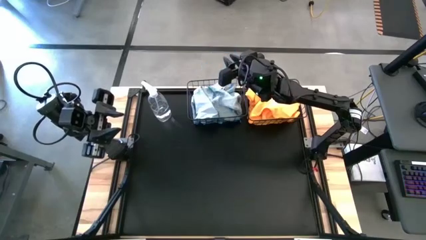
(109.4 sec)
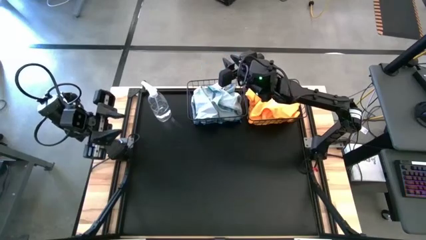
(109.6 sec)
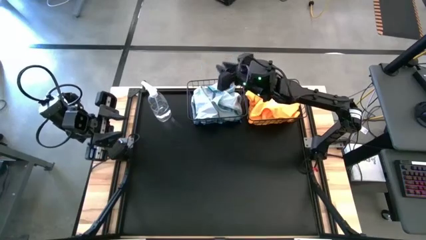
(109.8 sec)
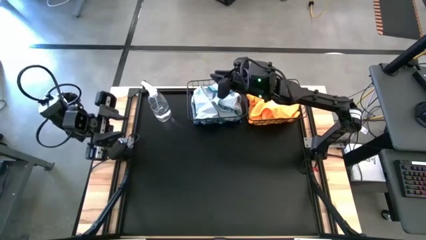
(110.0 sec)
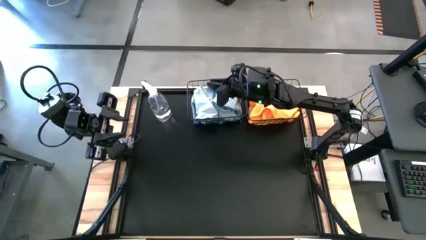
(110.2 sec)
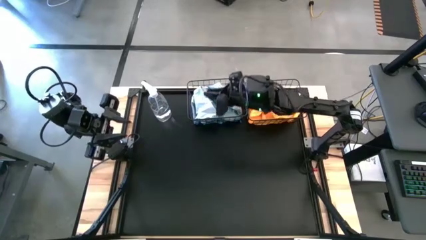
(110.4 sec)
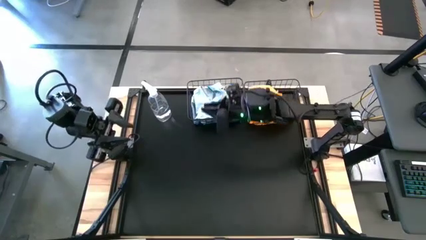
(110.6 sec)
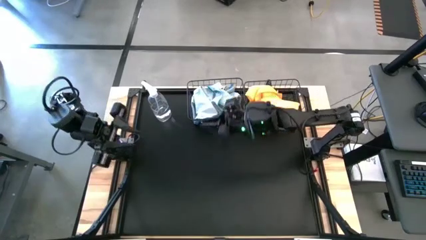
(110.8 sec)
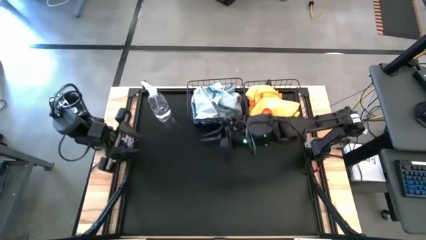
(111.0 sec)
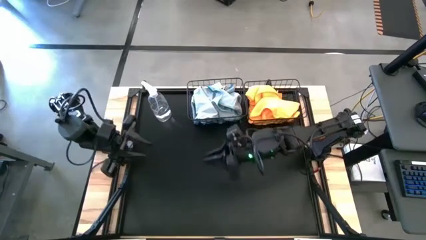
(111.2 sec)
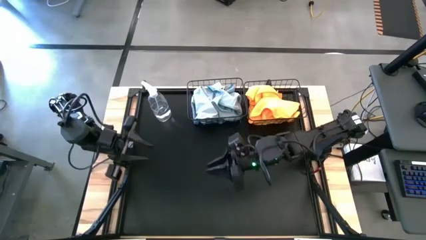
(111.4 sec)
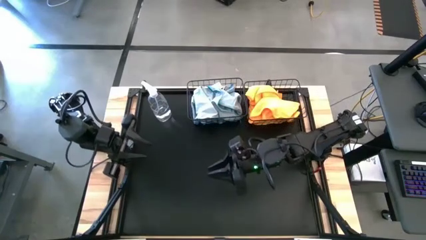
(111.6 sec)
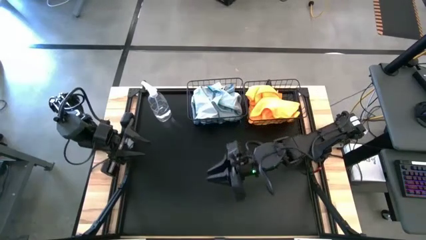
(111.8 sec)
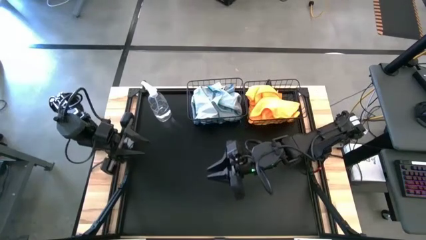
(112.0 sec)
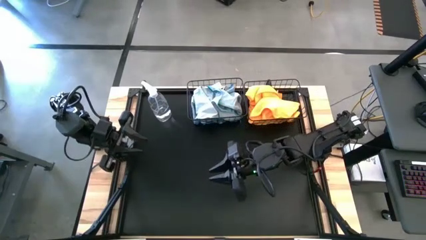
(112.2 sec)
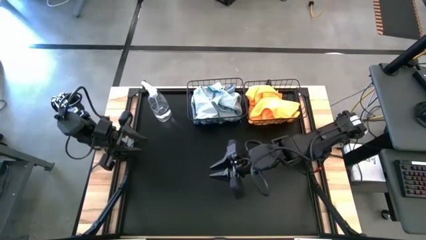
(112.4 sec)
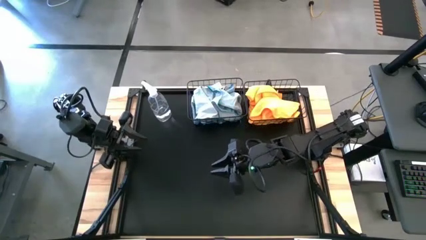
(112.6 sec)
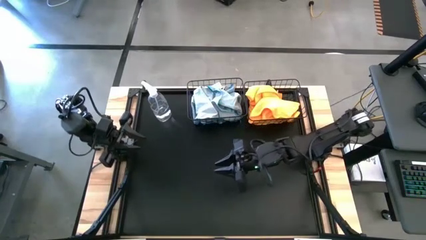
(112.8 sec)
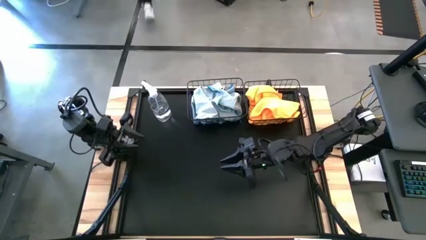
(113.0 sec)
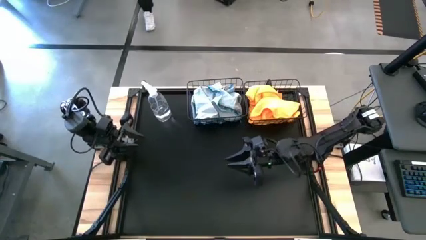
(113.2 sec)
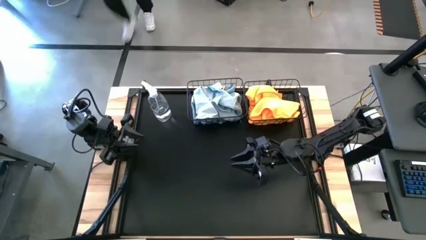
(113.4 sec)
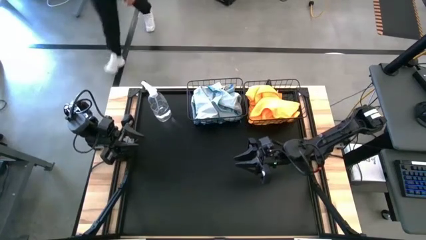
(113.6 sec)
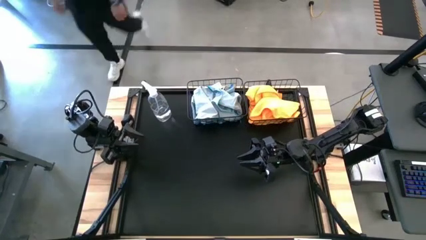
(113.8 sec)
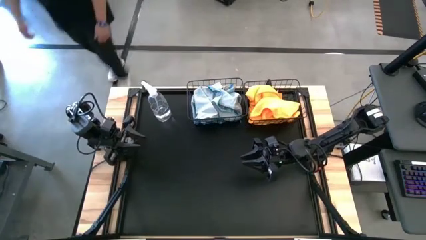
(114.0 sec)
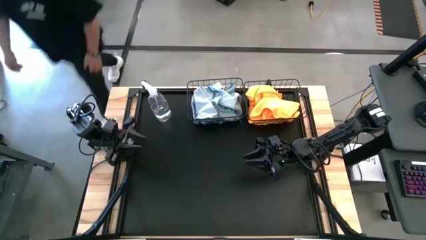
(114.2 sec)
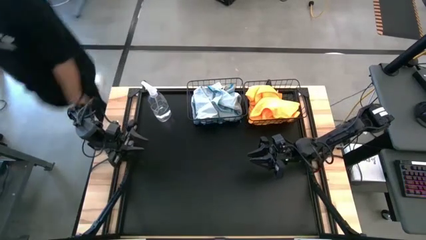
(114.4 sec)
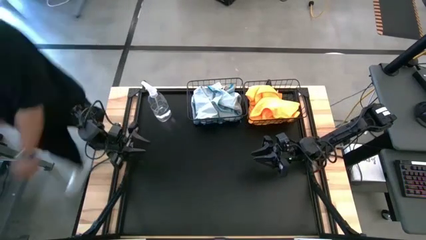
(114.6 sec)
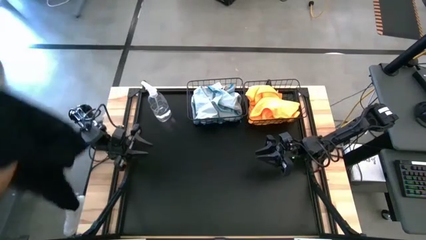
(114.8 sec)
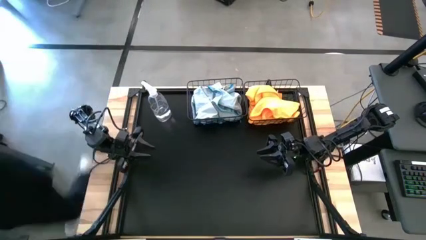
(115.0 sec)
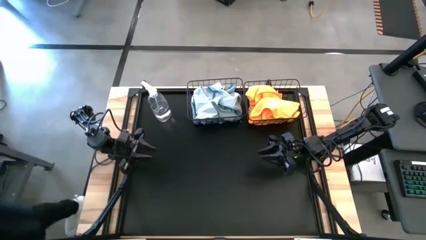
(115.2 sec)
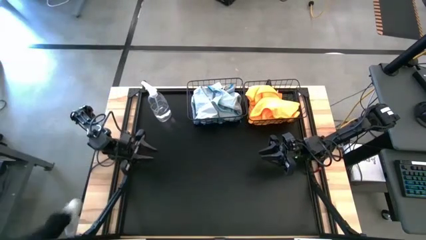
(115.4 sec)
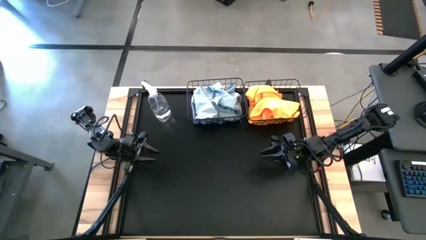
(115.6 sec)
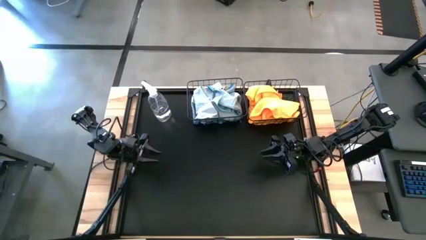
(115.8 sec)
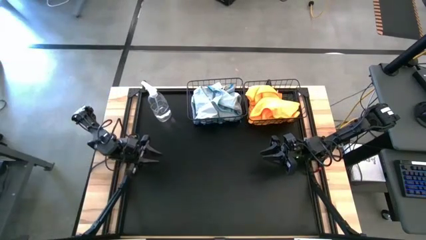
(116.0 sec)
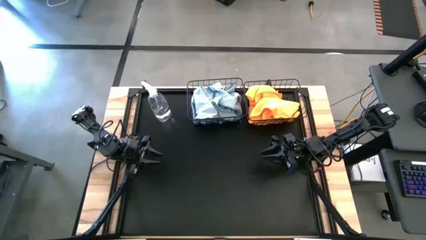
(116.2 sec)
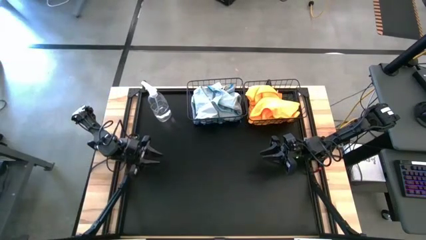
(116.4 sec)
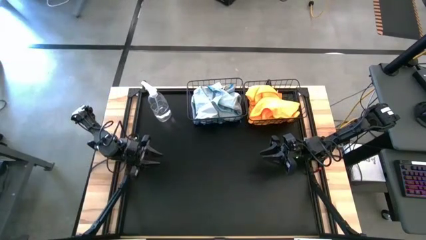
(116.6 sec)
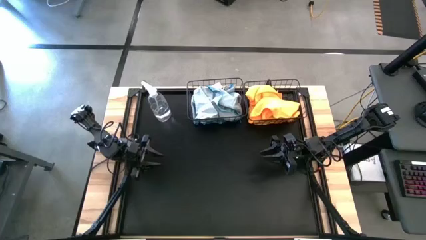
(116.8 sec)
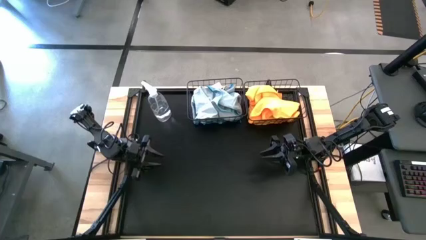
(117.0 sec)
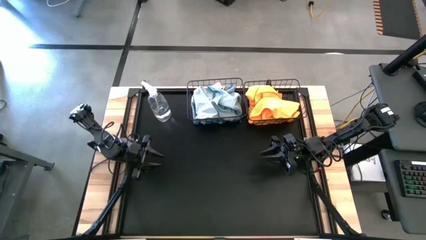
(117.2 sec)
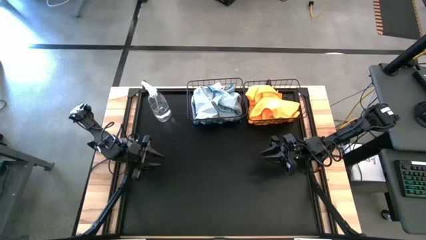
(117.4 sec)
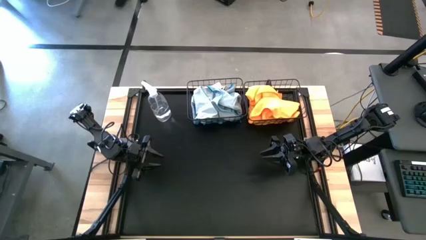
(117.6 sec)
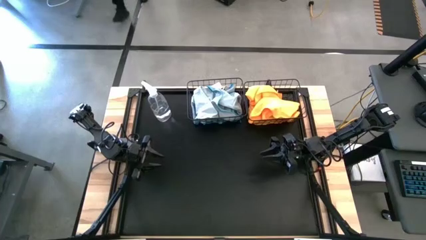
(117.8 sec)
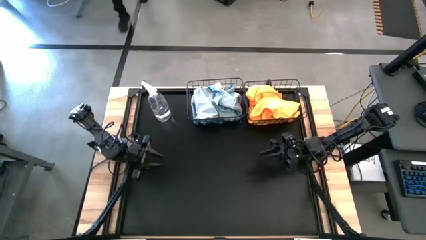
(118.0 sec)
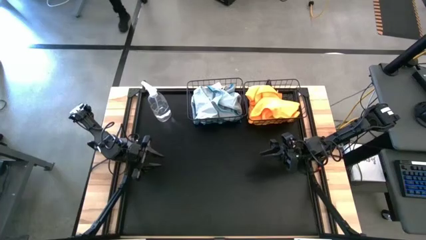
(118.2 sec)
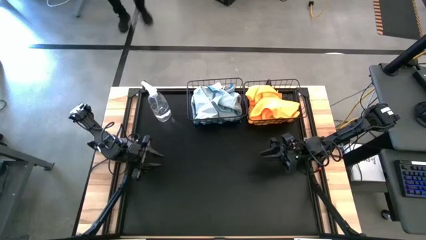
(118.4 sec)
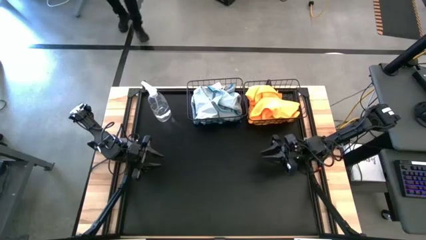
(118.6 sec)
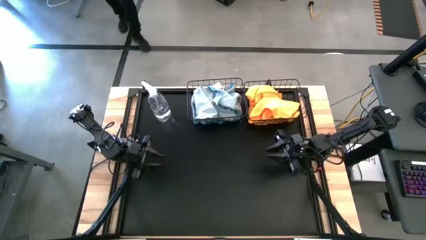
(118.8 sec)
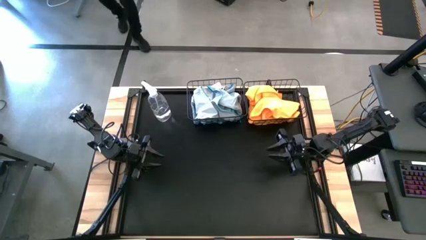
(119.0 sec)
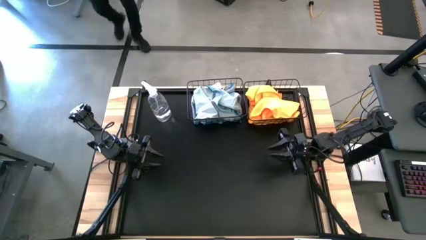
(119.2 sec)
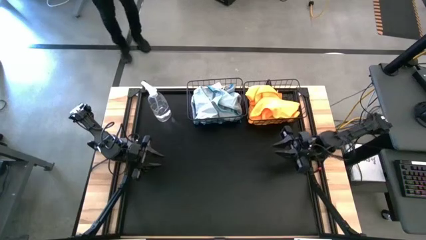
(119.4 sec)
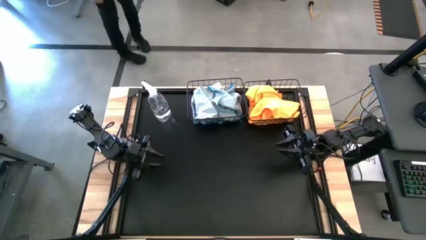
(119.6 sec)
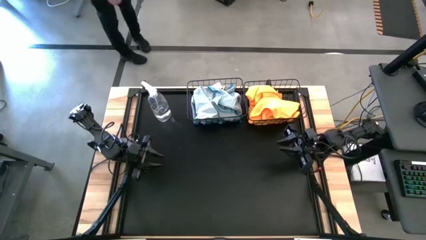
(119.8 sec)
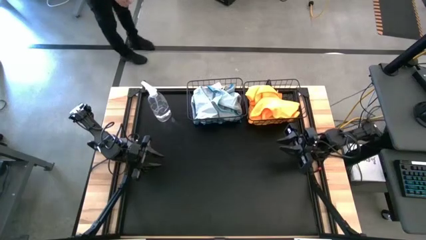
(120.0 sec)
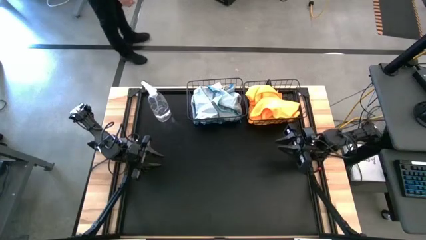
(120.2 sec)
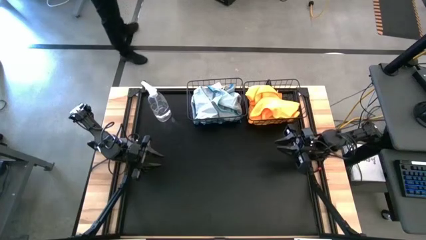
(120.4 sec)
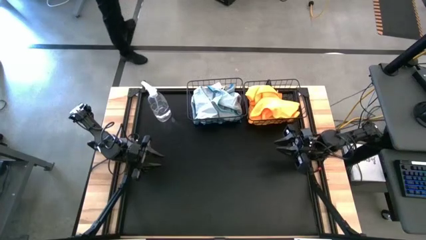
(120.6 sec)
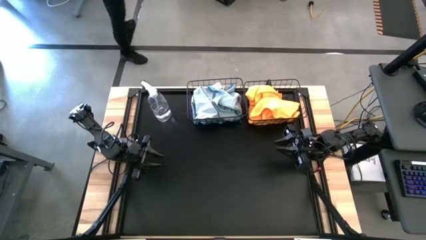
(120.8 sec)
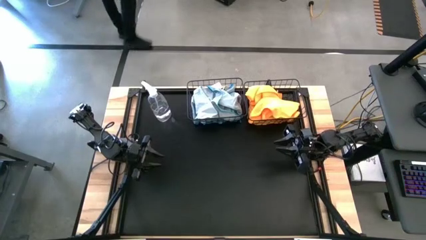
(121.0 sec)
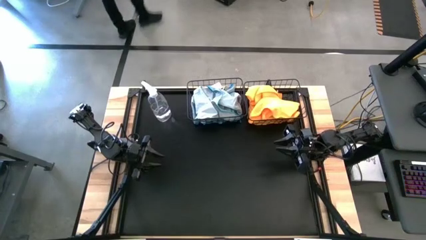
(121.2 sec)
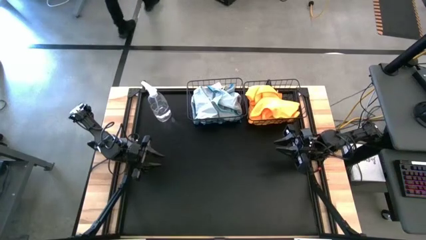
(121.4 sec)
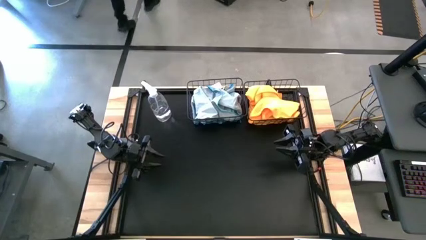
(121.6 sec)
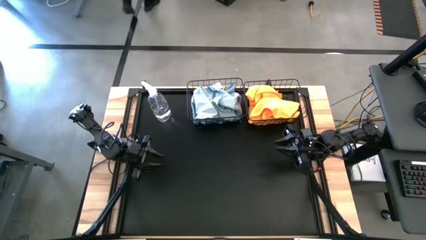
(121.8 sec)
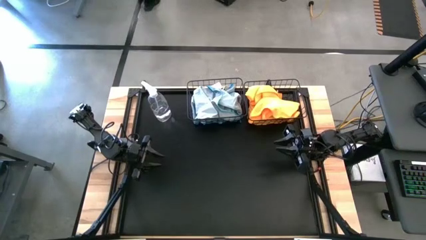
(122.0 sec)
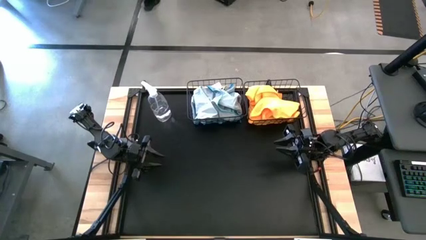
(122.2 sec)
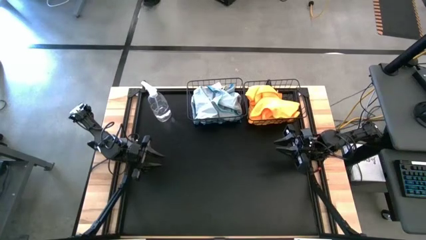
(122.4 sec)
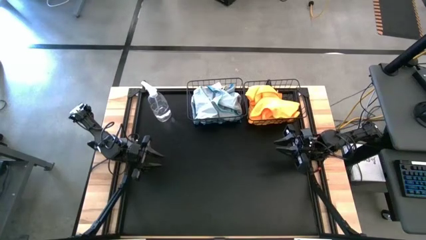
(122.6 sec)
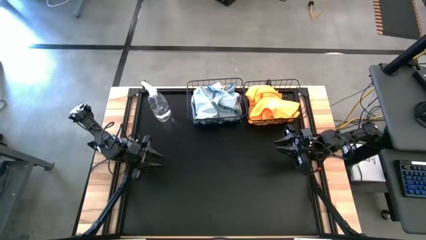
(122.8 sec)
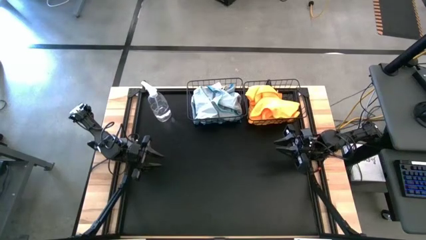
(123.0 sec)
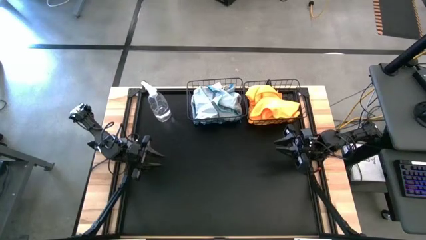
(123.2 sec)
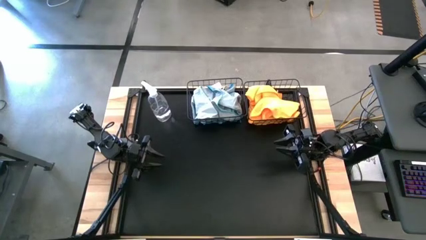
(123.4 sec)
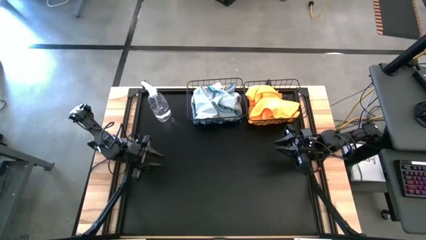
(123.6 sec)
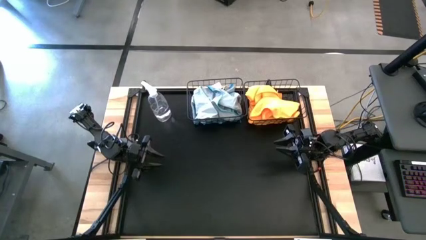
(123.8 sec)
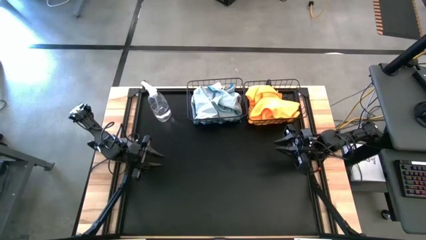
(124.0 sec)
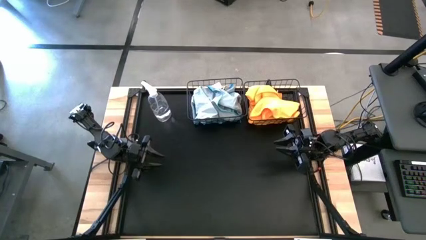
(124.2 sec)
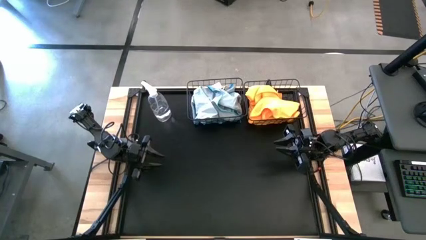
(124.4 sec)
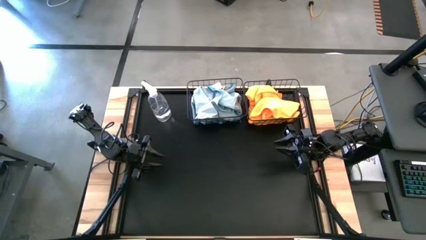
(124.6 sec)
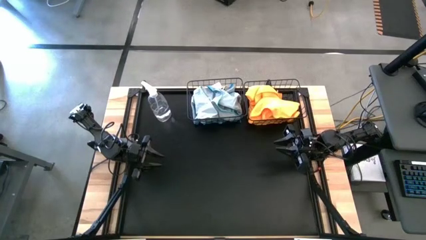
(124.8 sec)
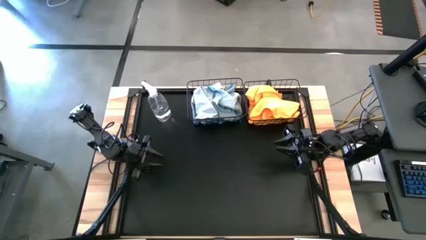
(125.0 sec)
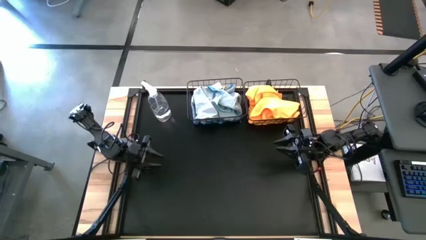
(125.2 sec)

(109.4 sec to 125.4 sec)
Task: Sort microfiber towel by color & place in baskets
Return to Home Position
